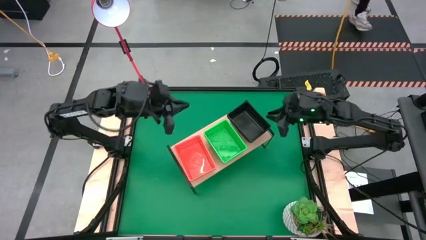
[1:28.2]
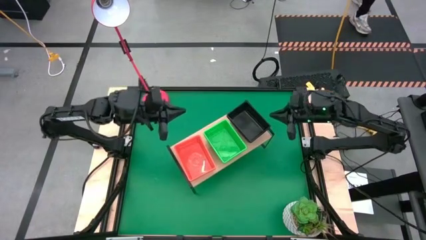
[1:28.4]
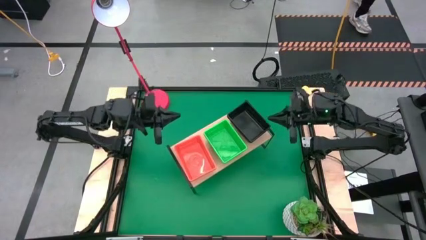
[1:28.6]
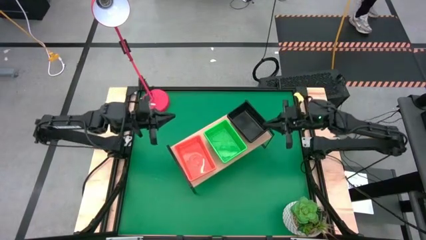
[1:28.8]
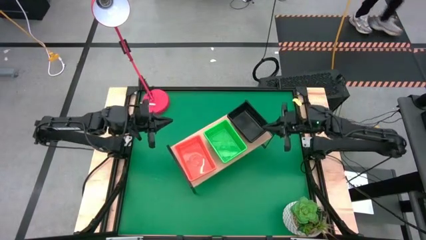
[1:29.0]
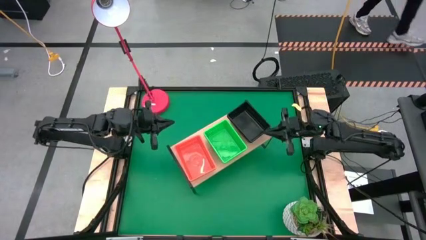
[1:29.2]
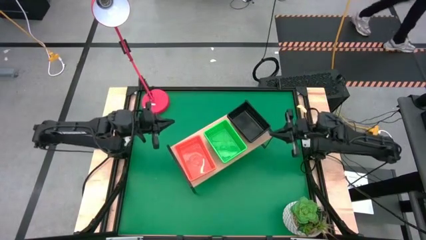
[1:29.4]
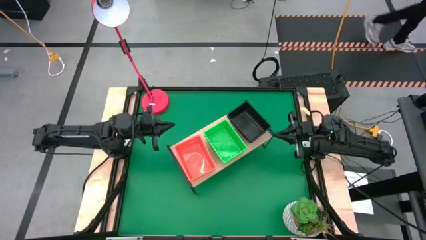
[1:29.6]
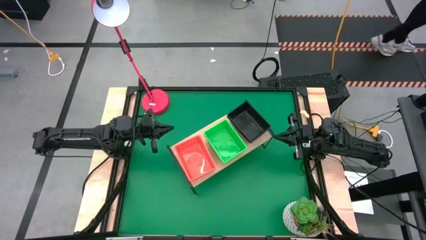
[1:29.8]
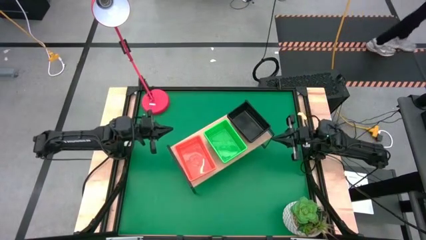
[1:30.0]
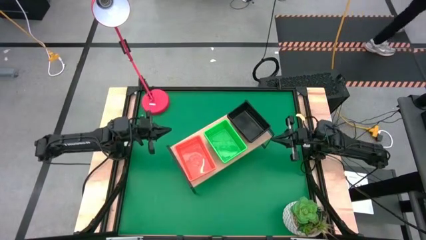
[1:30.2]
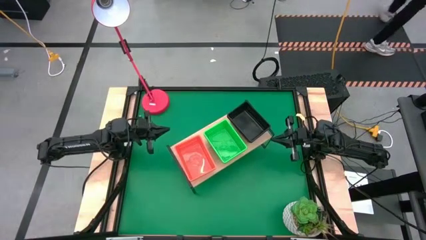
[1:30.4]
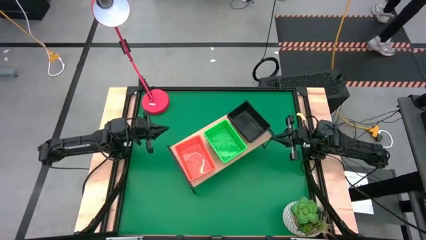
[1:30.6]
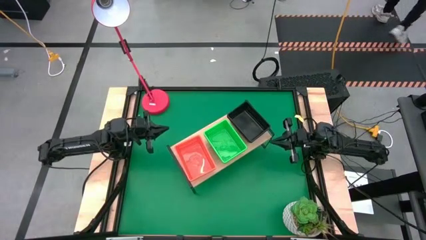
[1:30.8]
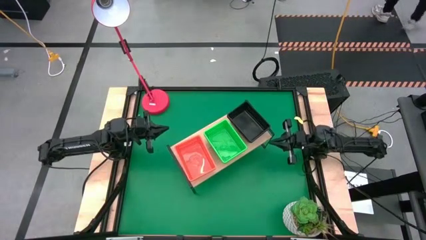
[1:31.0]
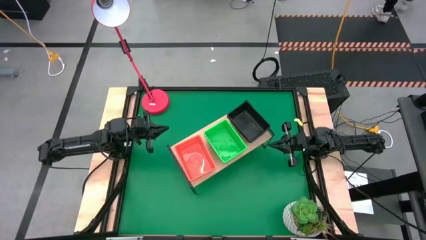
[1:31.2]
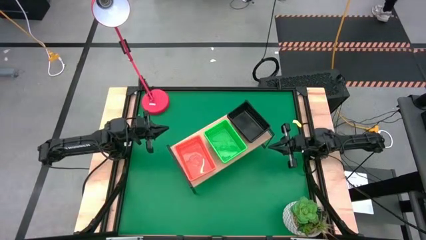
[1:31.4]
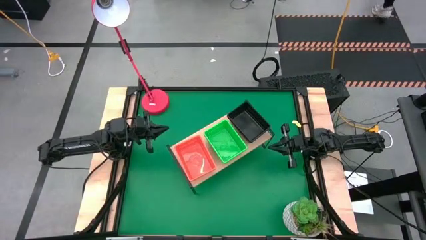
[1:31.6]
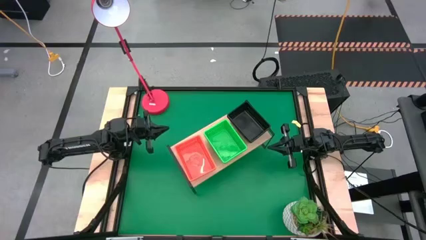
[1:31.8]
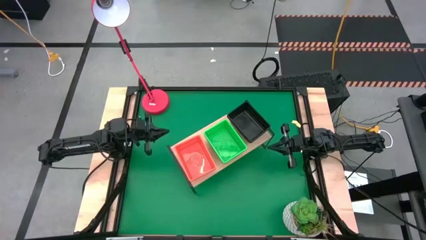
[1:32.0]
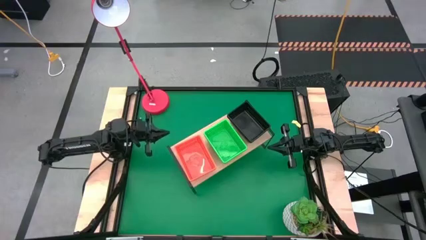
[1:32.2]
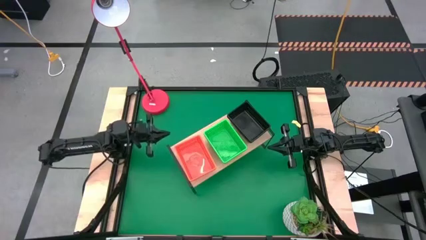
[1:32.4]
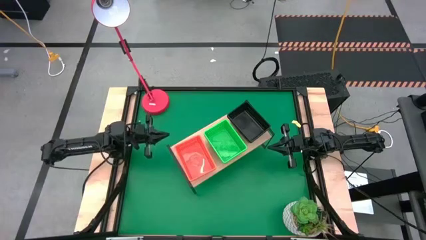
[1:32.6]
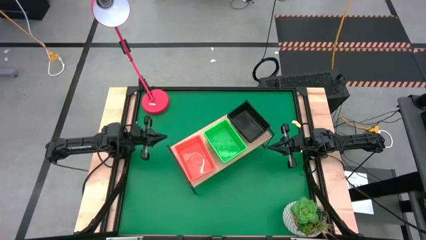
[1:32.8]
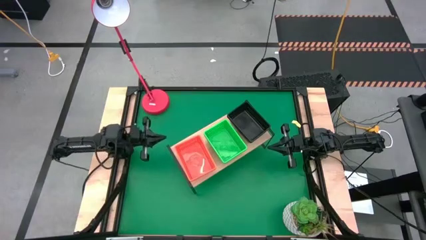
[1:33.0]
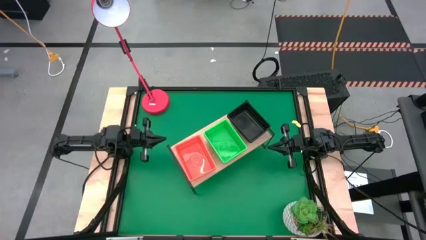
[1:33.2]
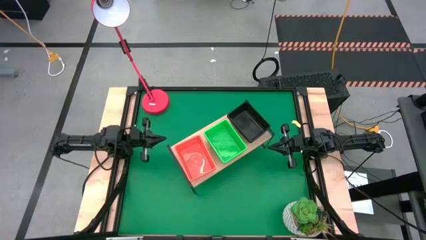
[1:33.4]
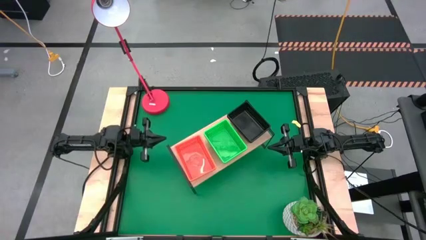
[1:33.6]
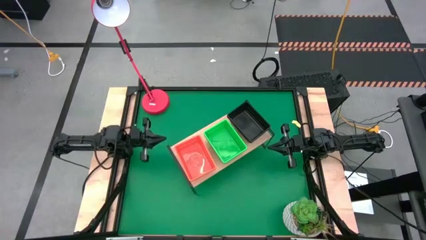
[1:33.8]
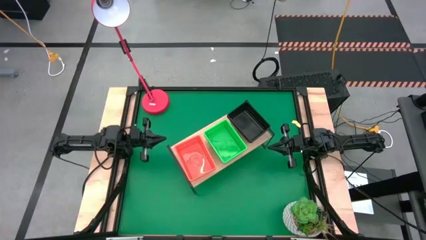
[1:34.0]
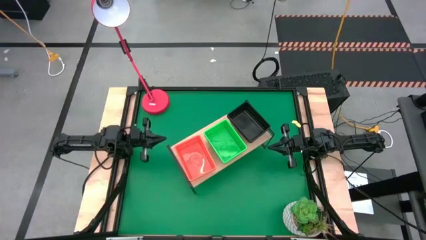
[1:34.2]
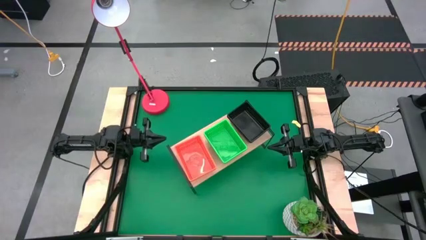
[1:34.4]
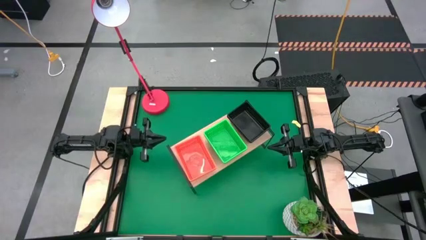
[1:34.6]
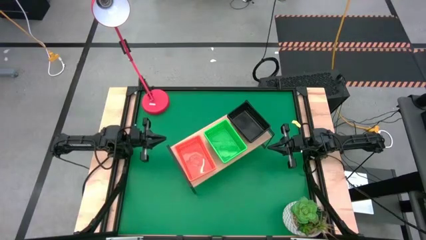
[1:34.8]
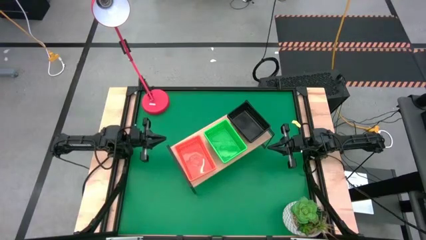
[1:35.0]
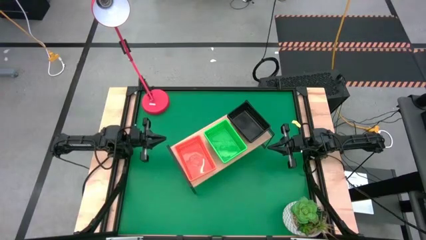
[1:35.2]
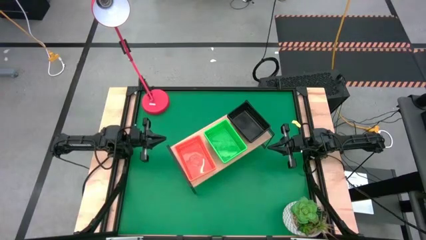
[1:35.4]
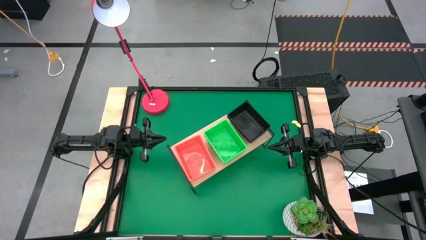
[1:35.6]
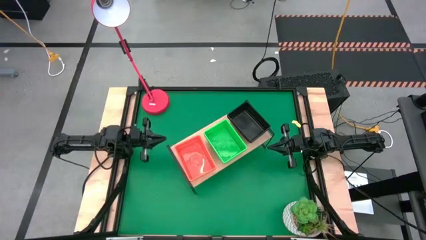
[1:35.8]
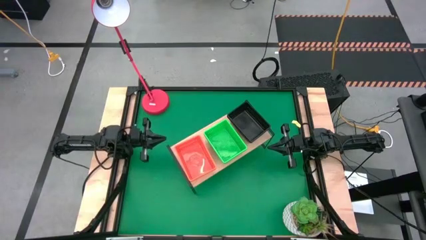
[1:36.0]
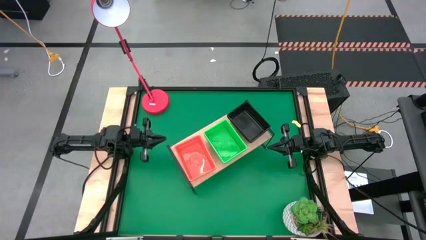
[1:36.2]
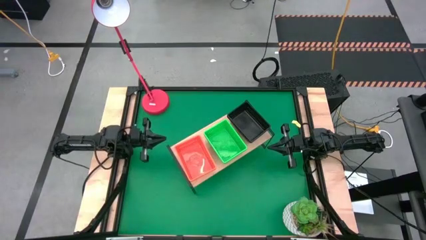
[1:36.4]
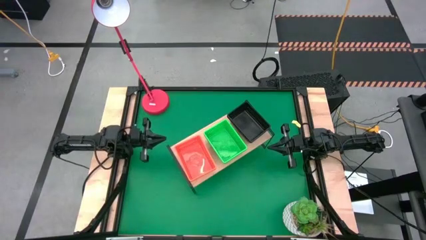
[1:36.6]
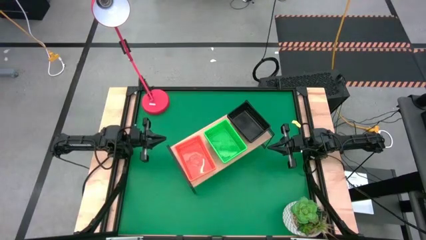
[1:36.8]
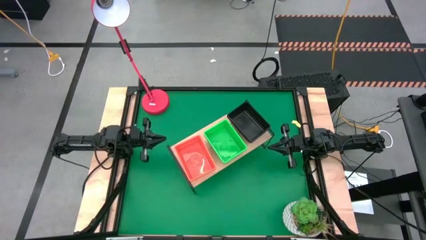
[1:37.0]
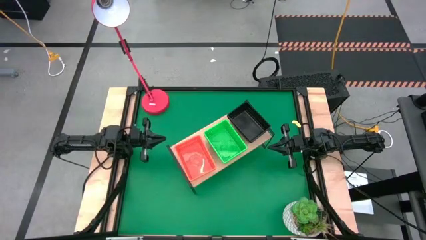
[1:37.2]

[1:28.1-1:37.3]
Task: Stack baskets on shelf by color
Return to Home Position

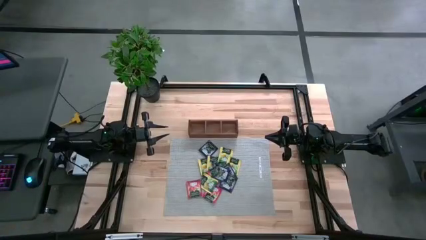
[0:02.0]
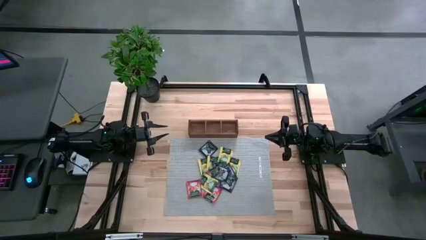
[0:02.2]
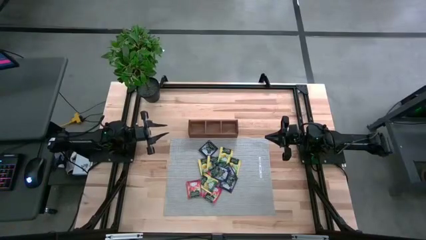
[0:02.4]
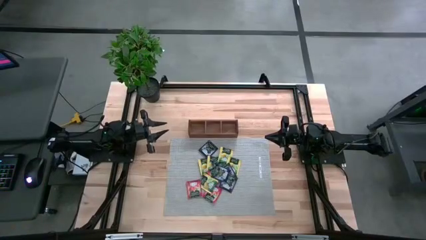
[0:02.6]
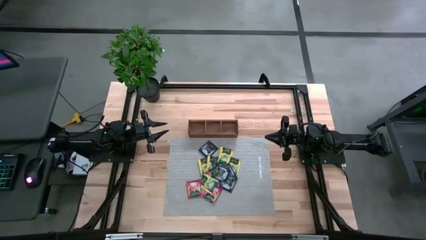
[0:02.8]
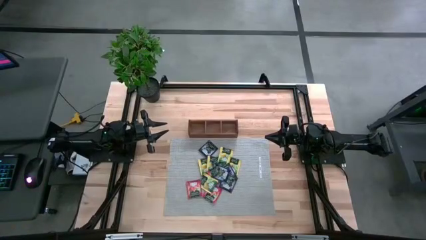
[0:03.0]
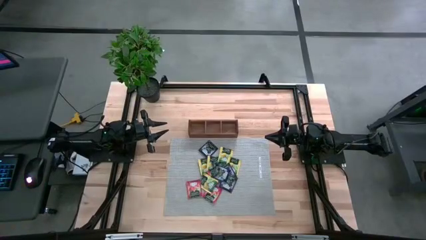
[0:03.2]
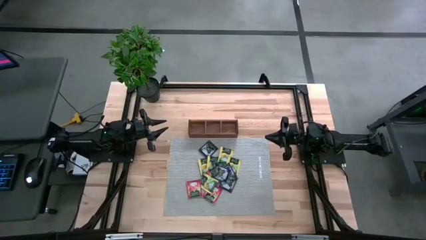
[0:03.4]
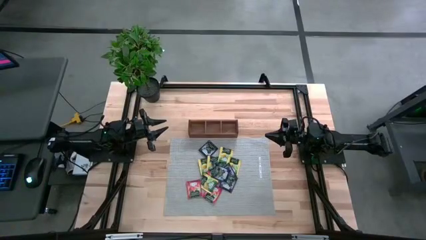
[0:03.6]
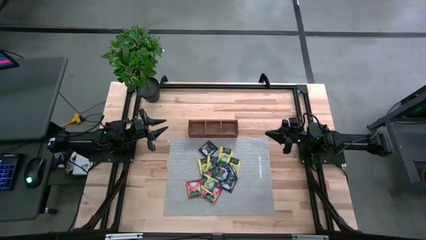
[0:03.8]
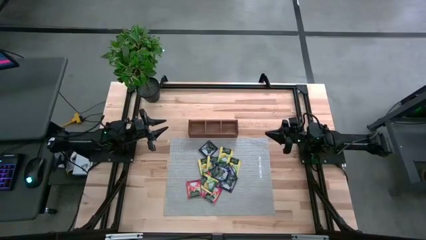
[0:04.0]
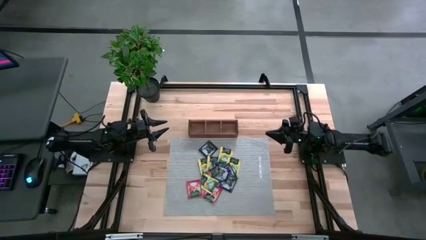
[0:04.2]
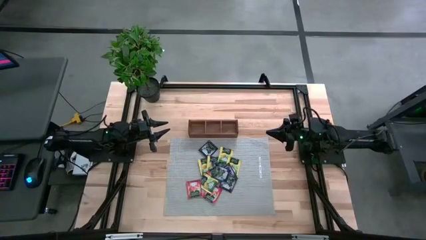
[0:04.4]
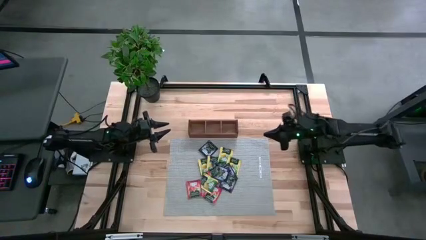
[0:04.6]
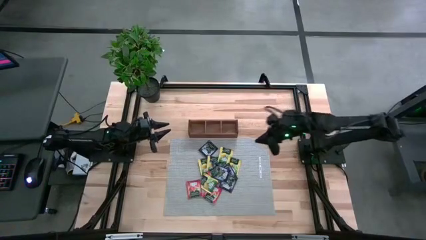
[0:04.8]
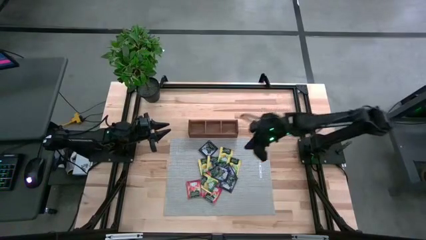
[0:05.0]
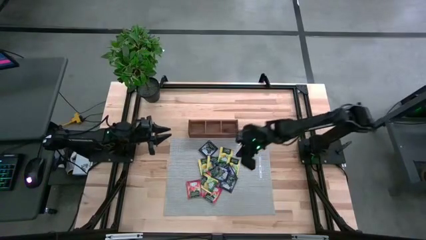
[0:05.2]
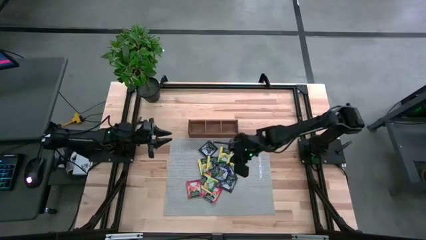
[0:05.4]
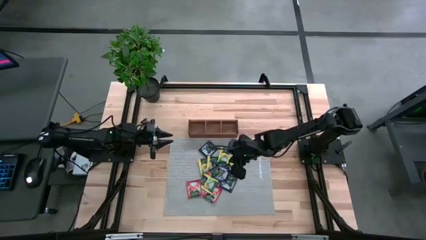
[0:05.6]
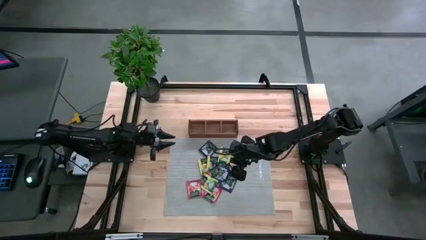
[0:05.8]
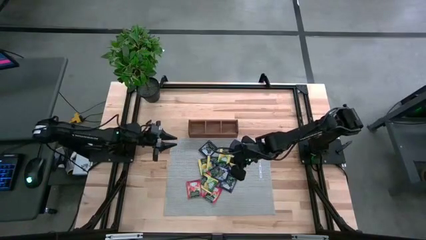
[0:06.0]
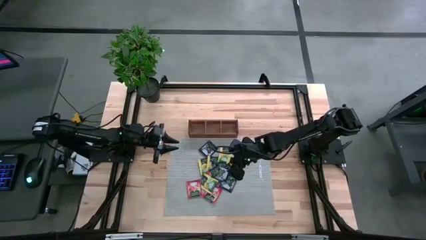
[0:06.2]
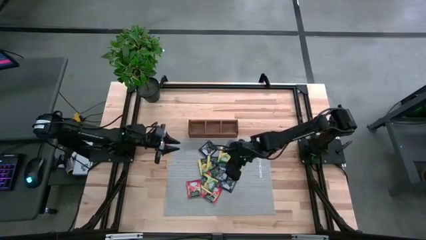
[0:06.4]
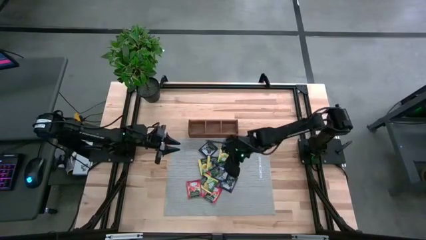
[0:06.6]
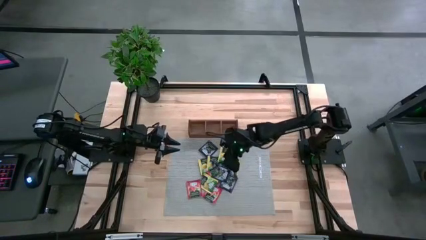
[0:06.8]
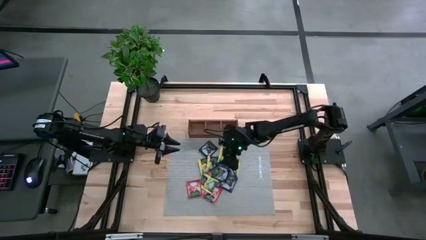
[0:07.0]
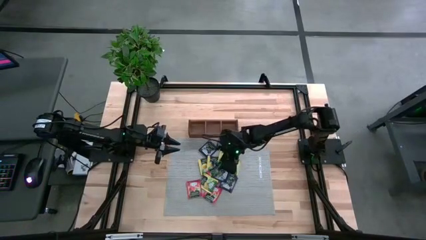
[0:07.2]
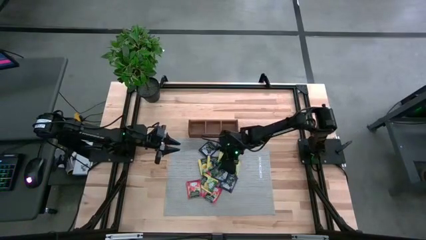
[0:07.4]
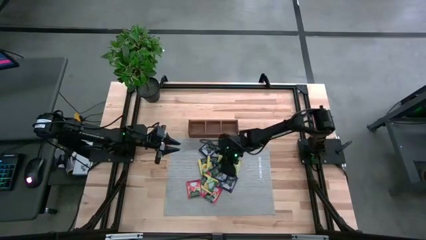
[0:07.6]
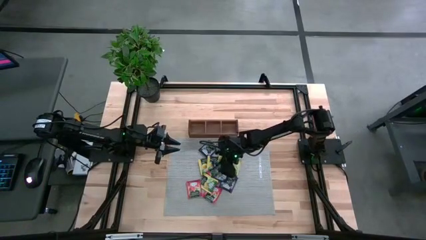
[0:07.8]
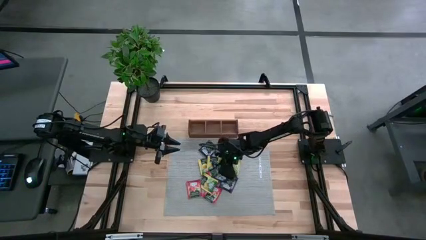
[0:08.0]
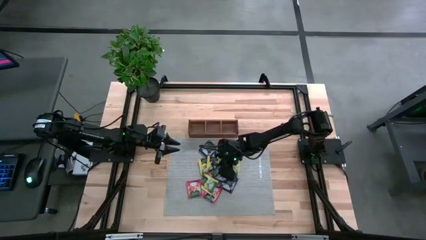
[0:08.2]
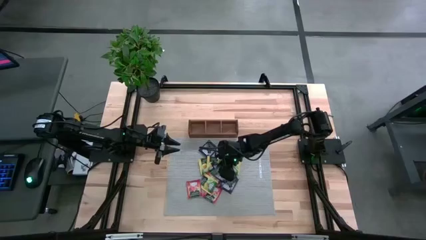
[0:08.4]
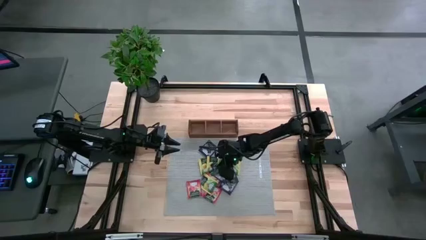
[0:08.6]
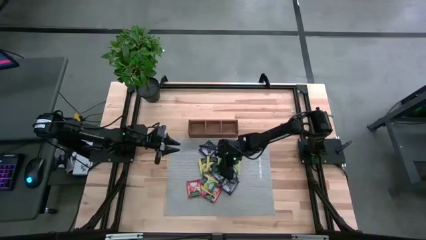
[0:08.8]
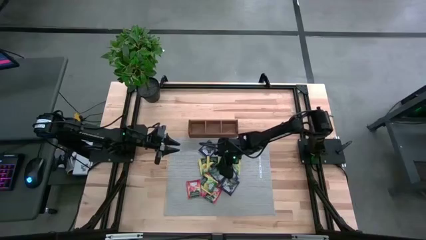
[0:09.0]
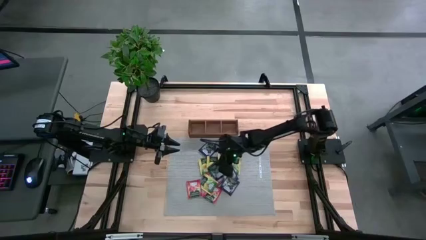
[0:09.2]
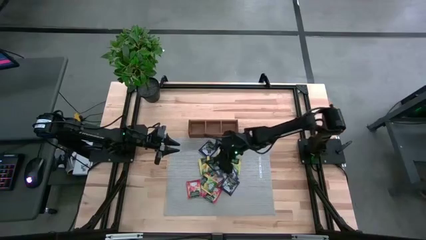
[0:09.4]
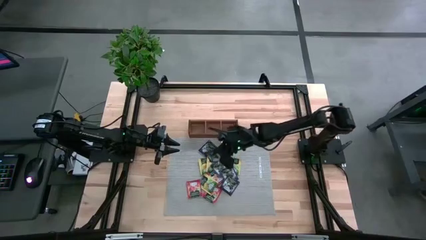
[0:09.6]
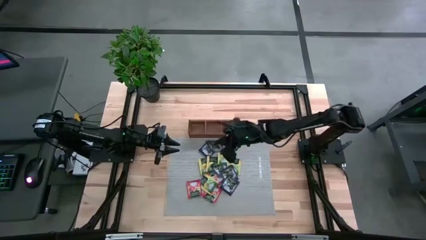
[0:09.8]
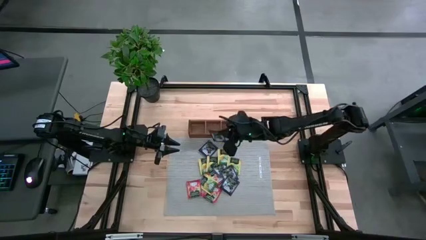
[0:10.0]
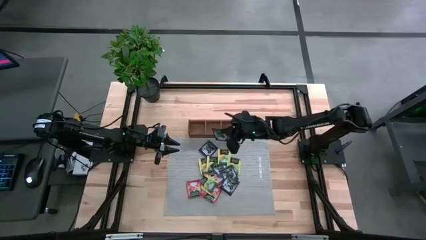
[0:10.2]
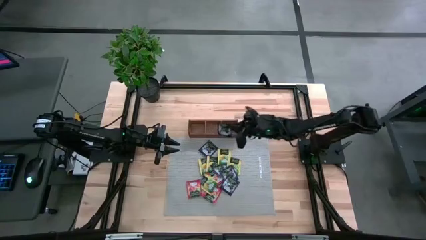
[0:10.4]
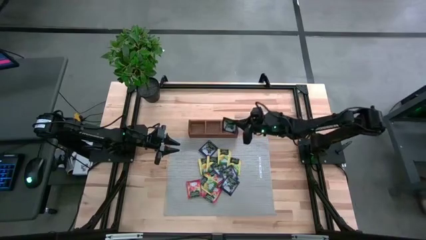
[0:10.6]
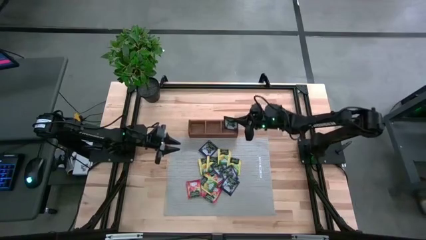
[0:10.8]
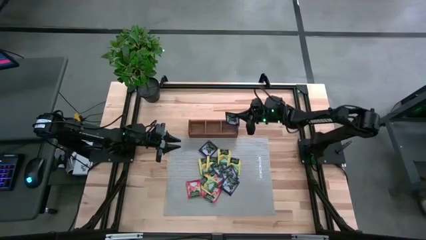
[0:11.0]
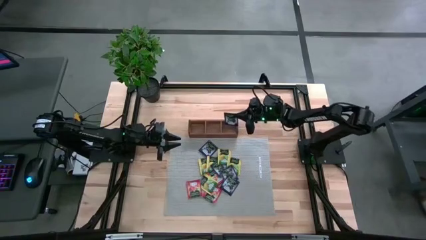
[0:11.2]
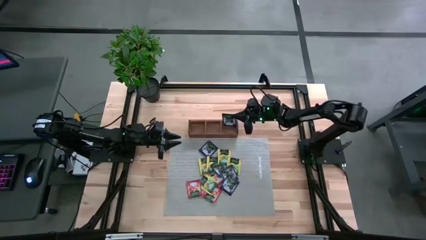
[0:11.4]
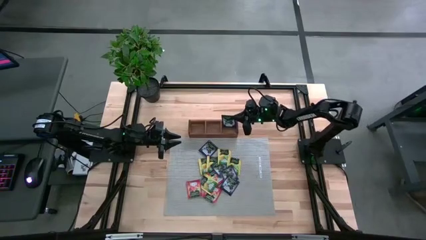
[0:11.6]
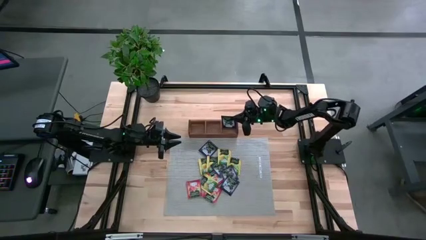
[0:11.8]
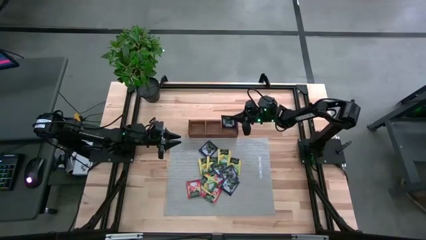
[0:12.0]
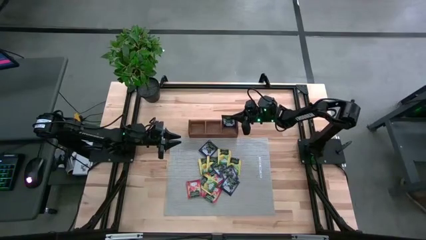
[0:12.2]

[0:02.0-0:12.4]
Task: Pick & Place Tea
Put the violet tea bag into the right section of the wooden organizer
